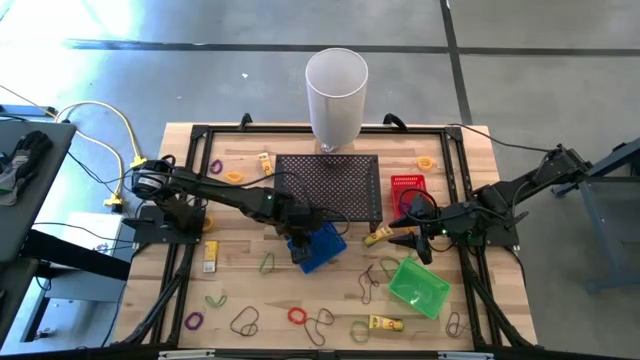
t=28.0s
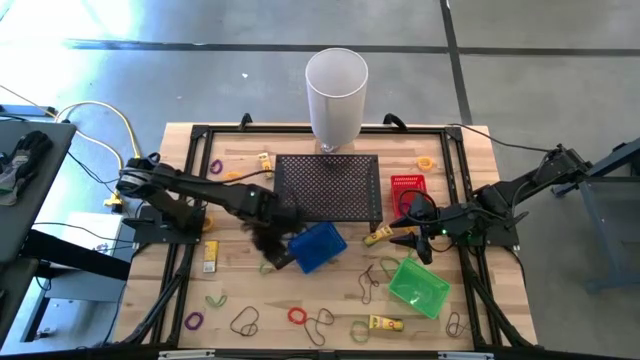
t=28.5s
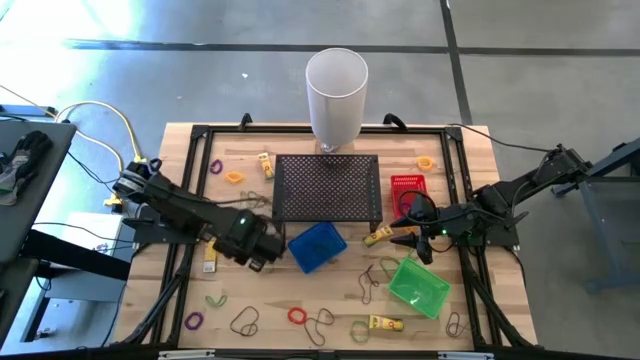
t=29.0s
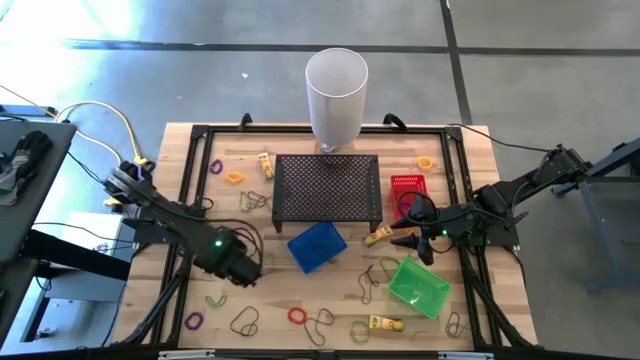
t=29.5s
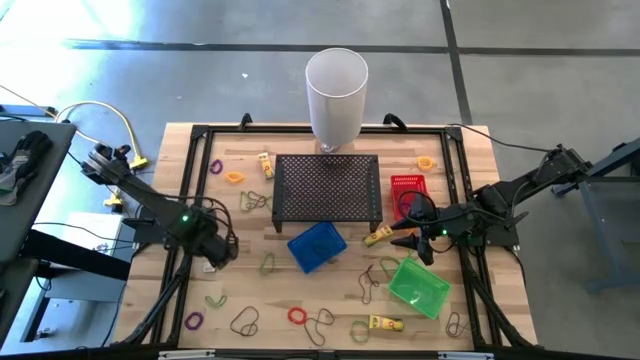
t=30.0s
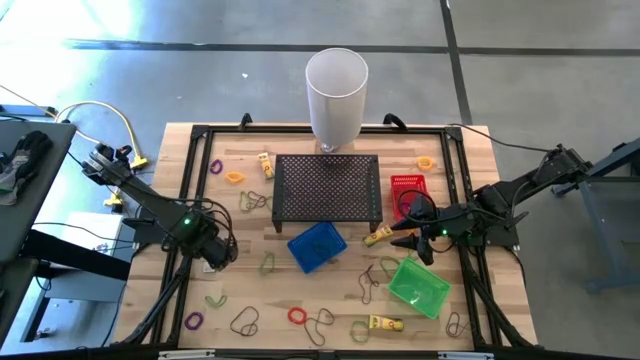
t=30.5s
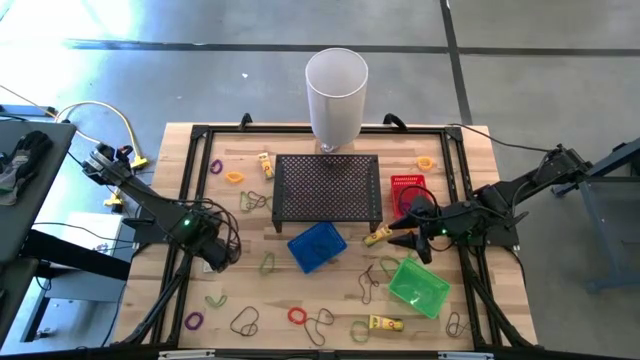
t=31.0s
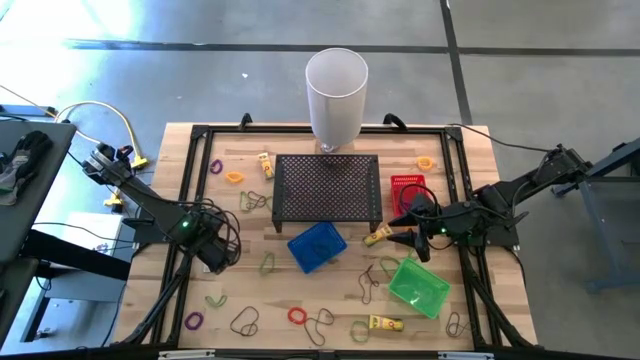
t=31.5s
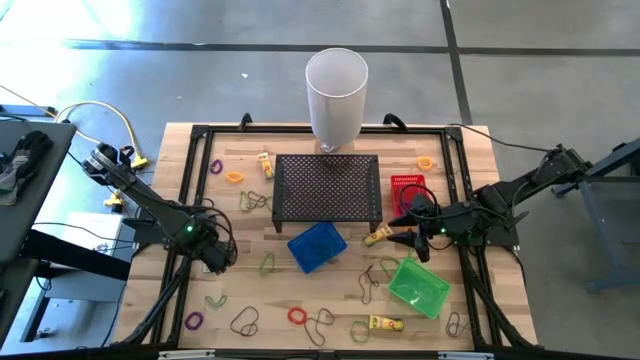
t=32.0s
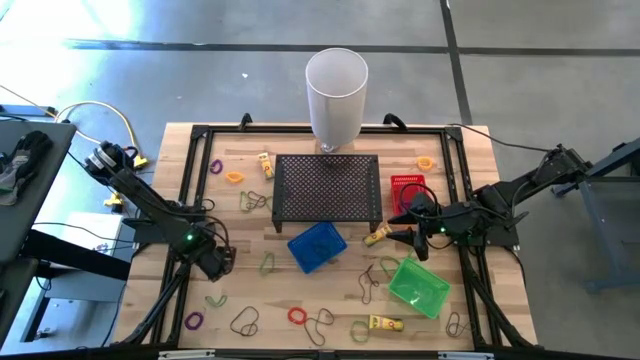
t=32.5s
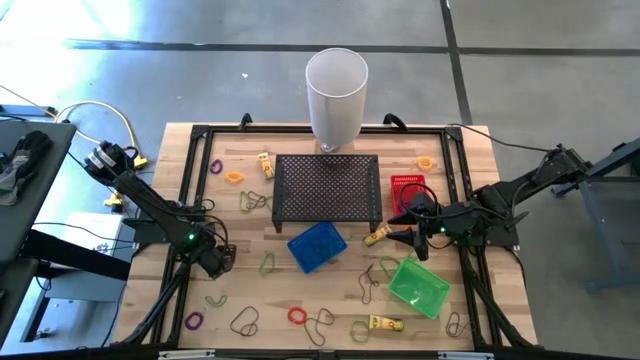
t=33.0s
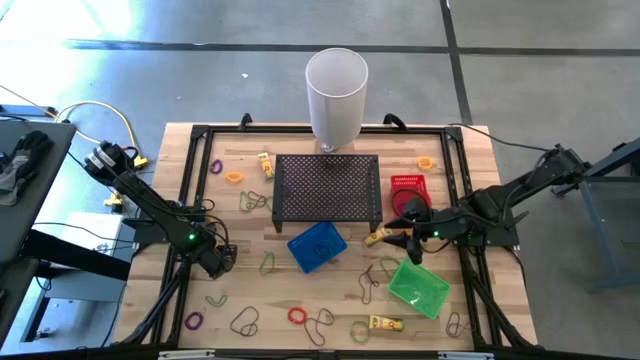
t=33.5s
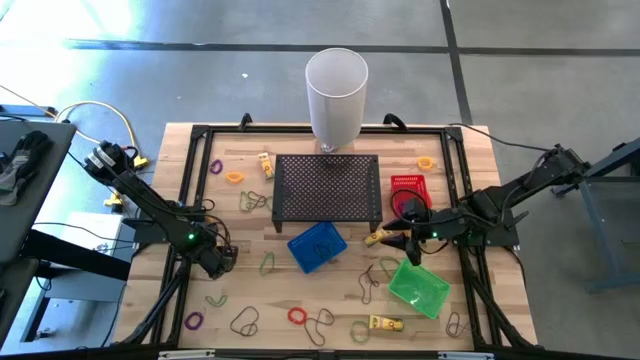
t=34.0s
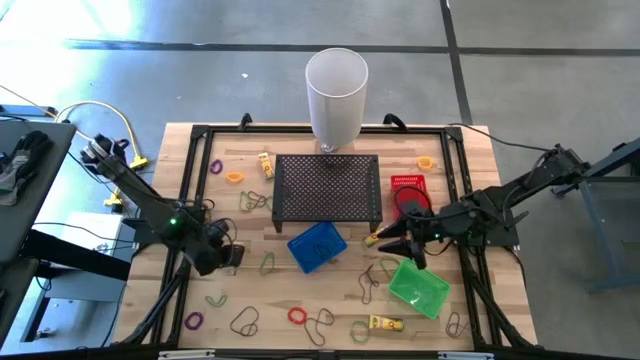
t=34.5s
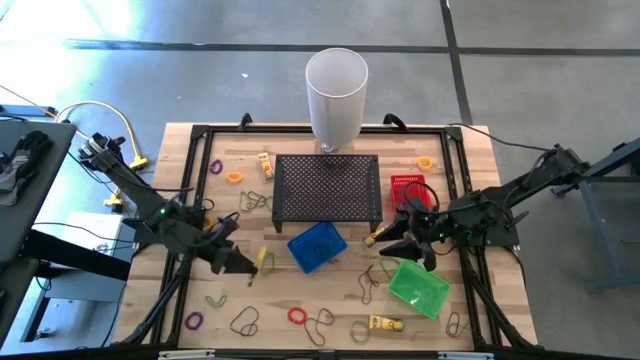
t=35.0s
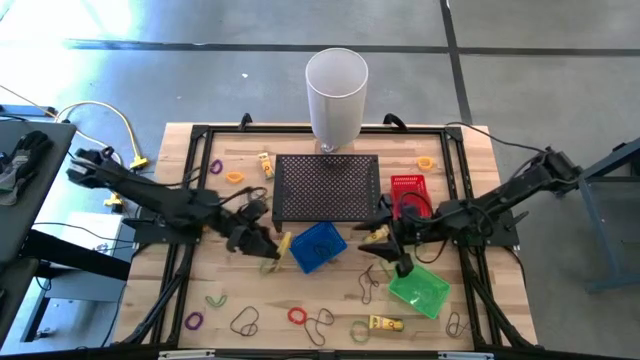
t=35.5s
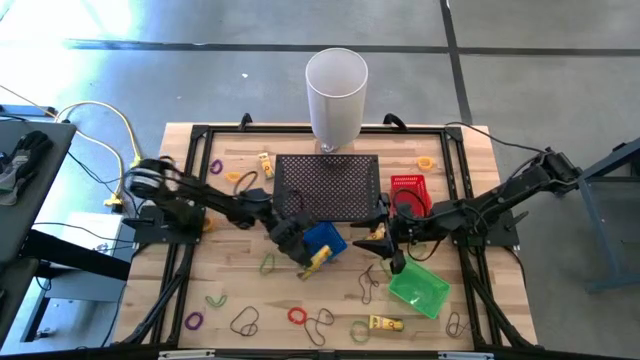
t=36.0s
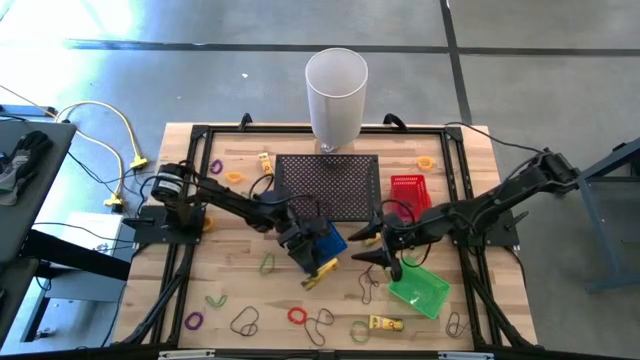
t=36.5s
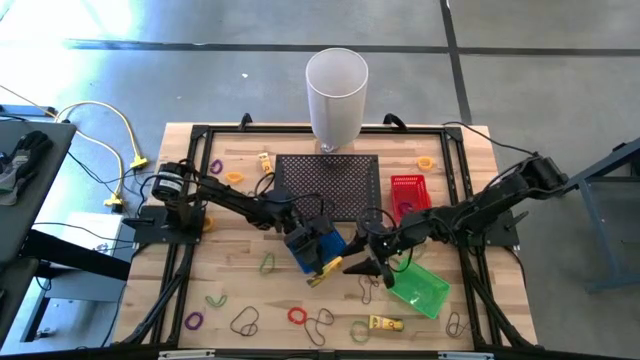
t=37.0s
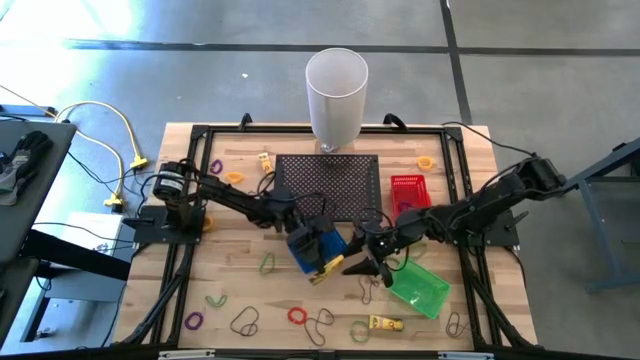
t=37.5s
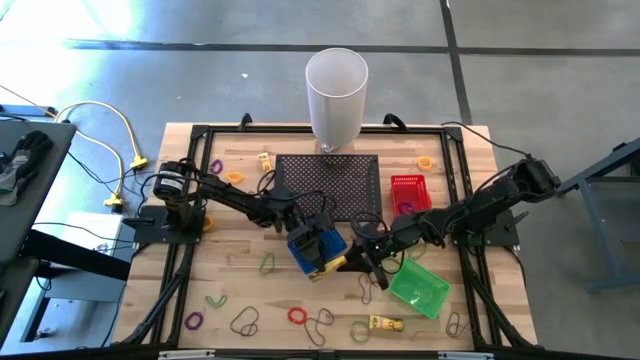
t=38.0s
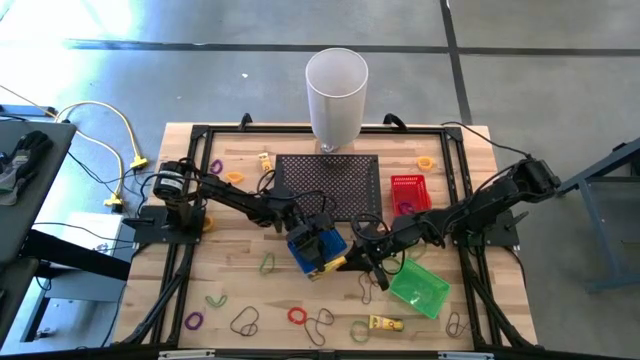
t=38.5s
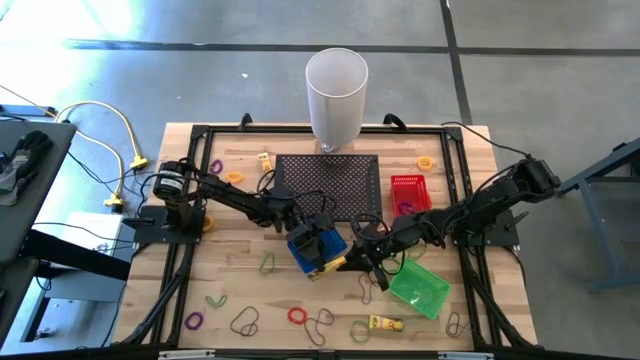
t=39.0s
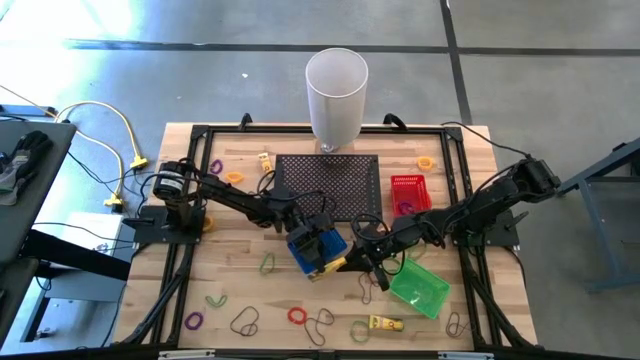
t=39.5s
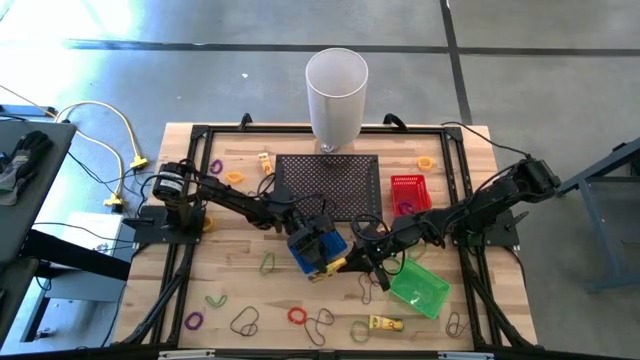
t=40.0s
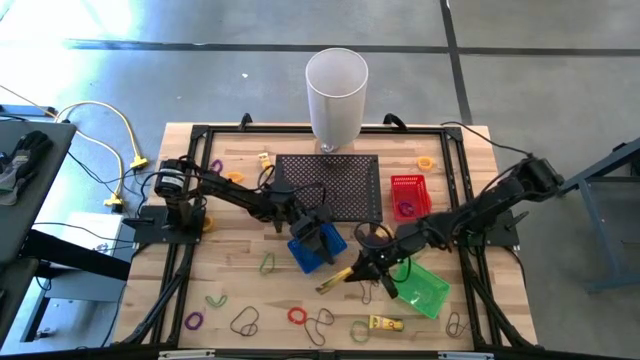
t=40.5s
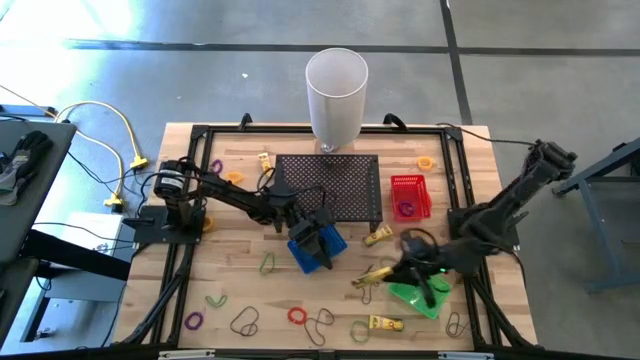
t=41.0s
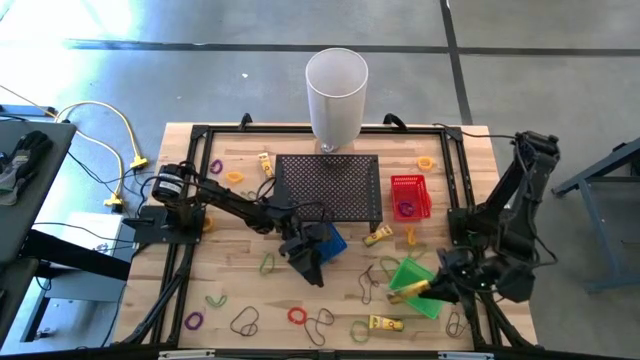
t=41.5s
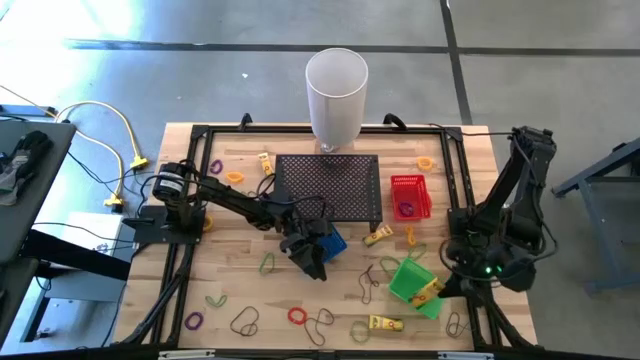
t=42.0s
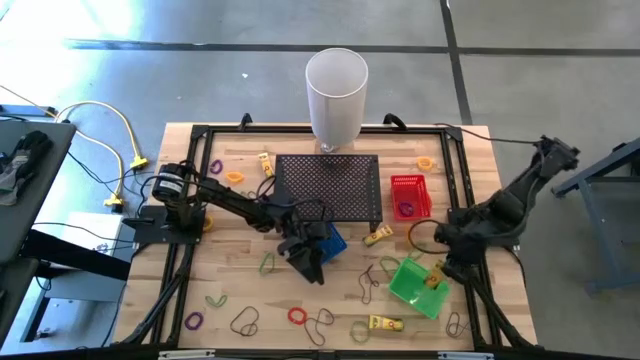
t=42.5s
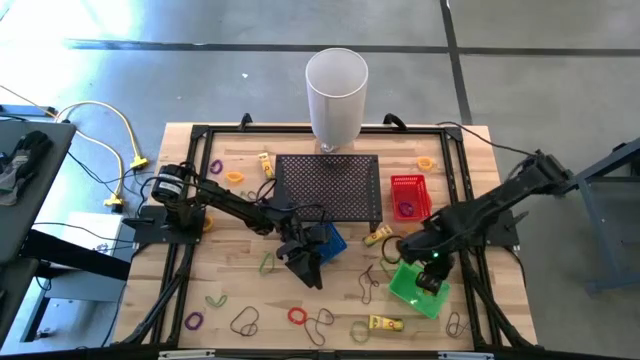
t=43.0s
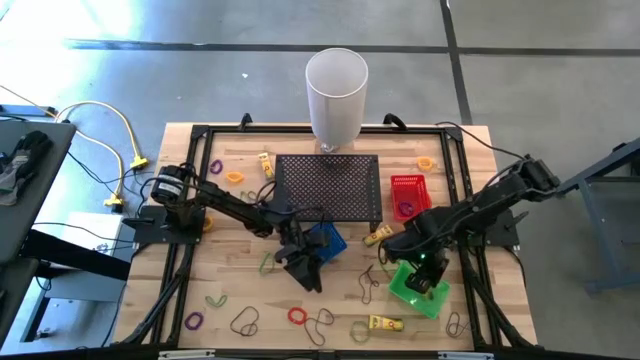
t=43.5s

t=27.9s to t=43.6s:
Task: Pick & Place Office Desk Supplies
Put the yellow crayon box into the green bin

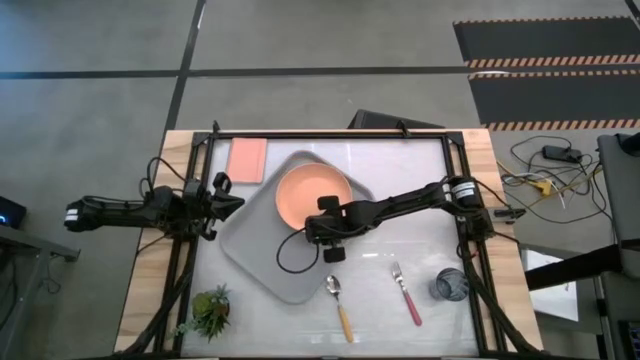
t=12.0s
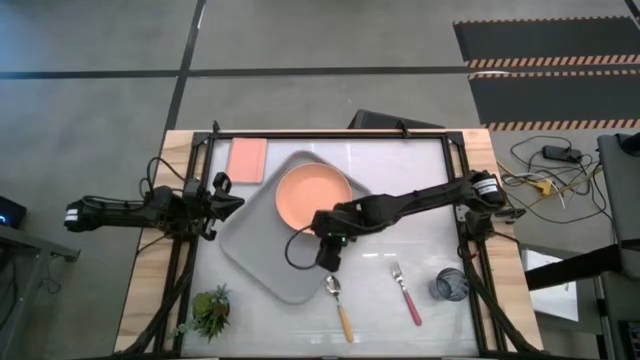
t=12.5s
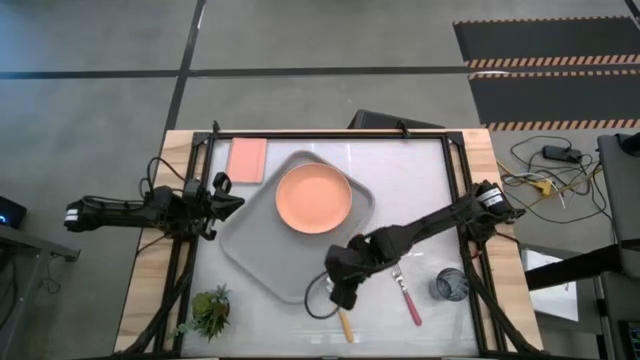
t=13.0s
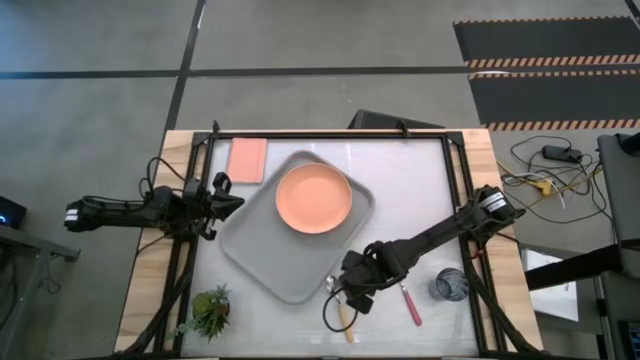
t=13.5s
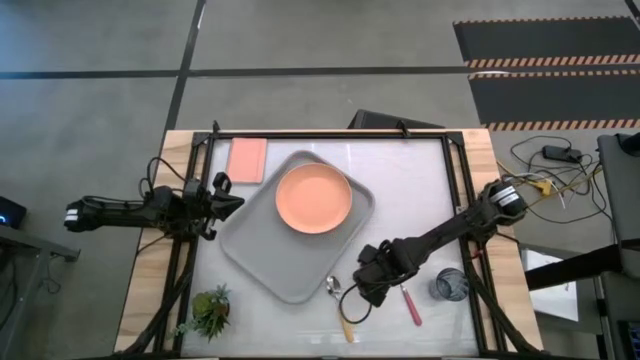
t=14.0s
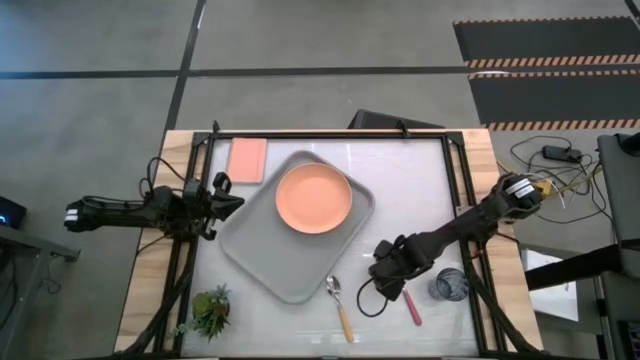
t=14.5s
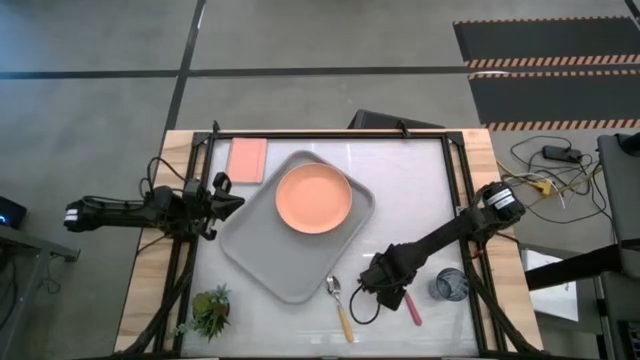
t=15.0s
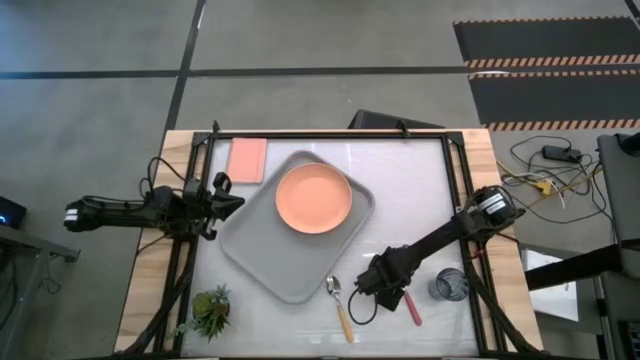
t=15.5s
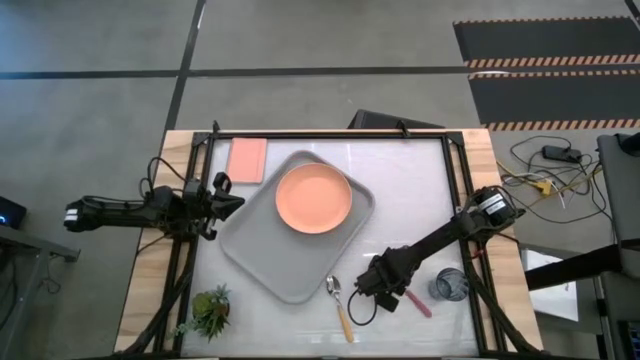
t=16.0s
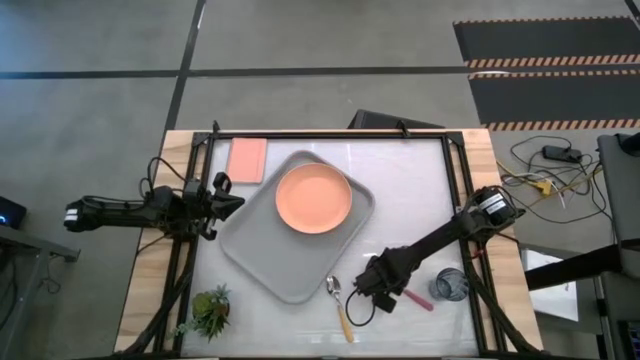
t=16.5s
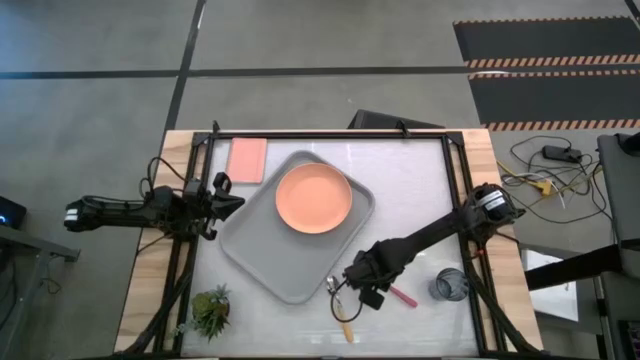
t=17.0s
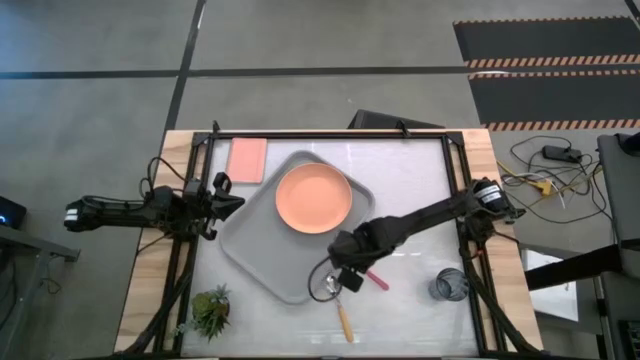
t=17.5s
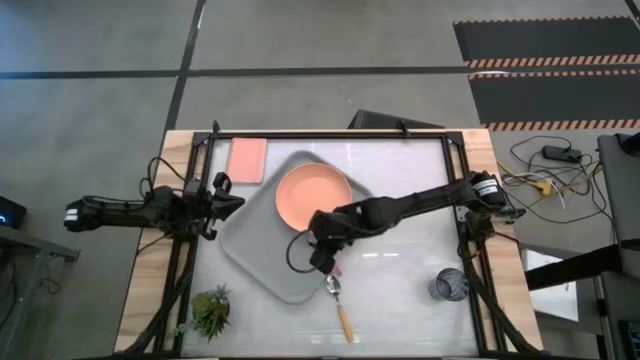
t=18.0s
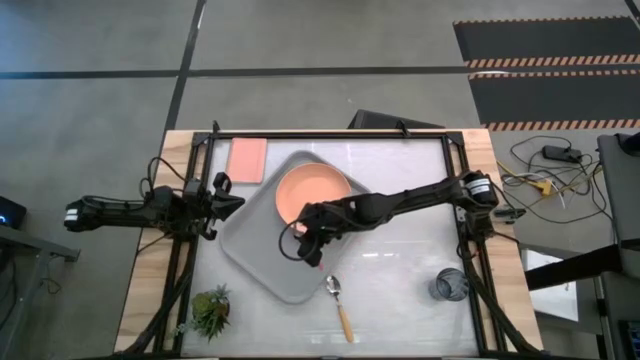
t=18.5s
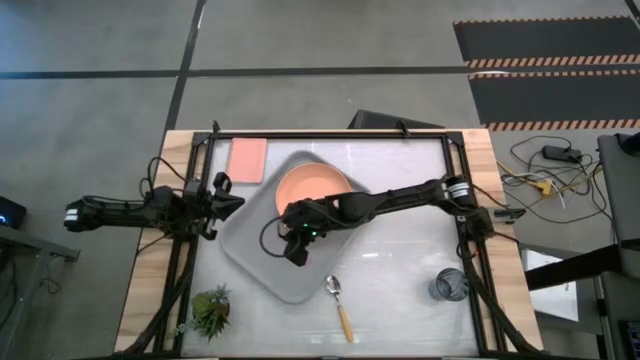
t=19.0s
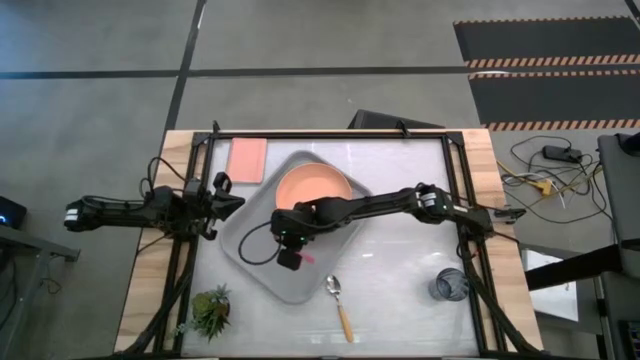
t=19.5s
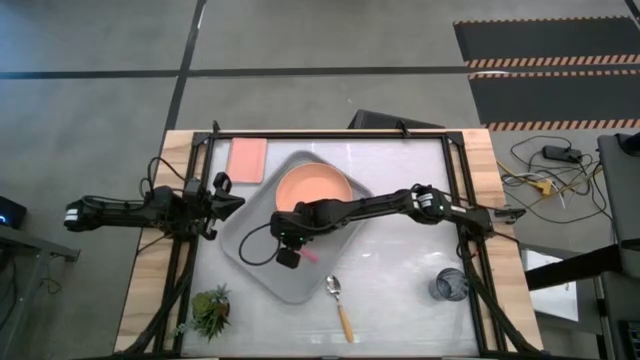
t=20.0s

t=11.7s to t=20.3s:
Task: Pick and place plate/cup/fork/spoon on tray
Put the pink fork on the gray serving tray to the left of the orange plate
